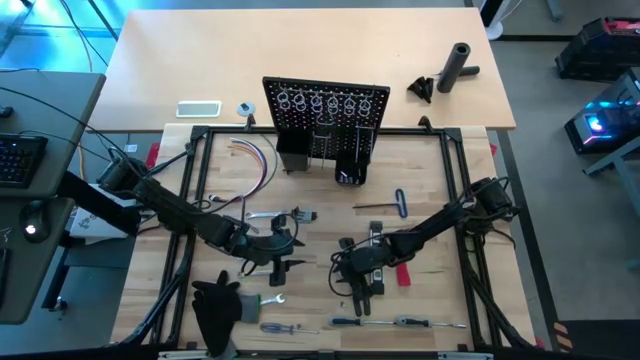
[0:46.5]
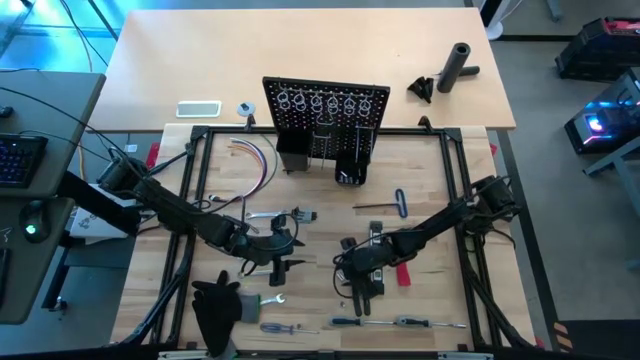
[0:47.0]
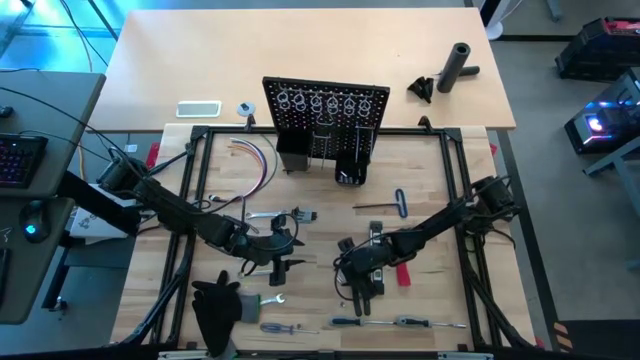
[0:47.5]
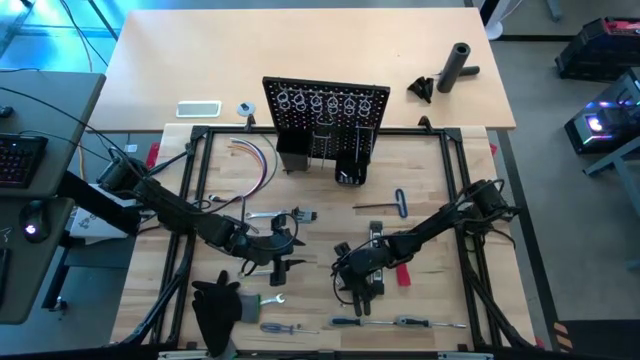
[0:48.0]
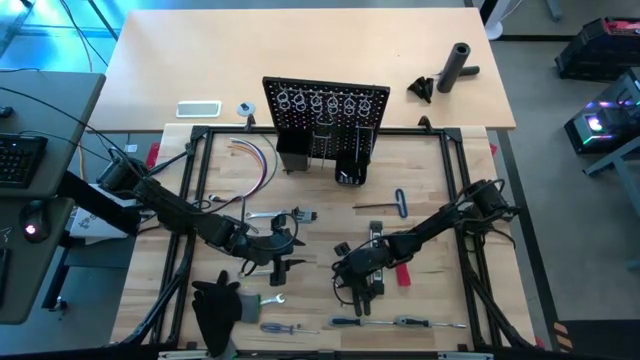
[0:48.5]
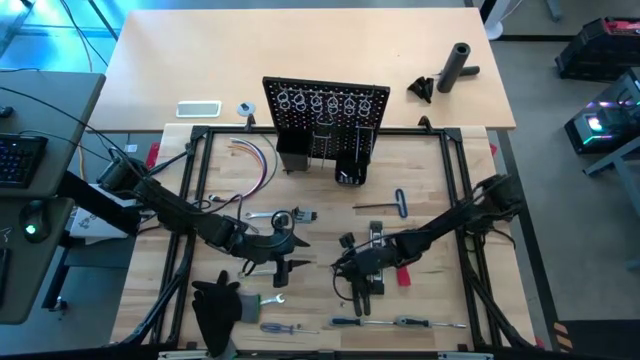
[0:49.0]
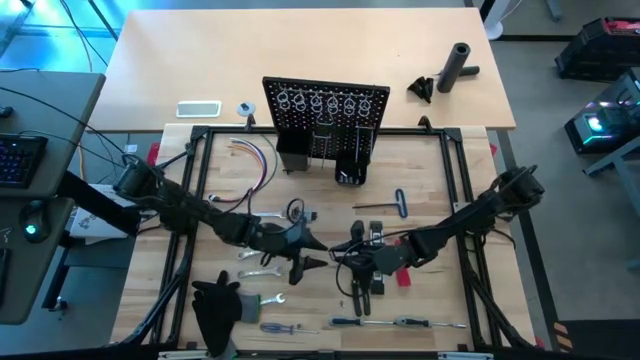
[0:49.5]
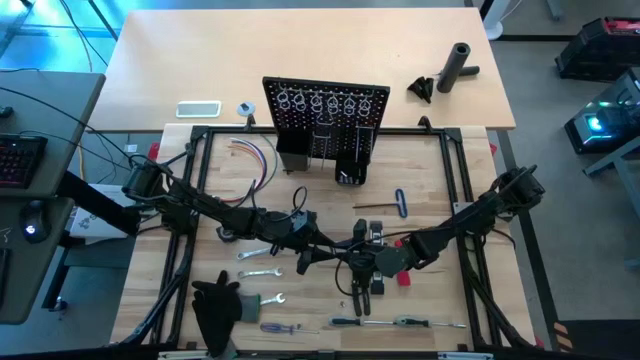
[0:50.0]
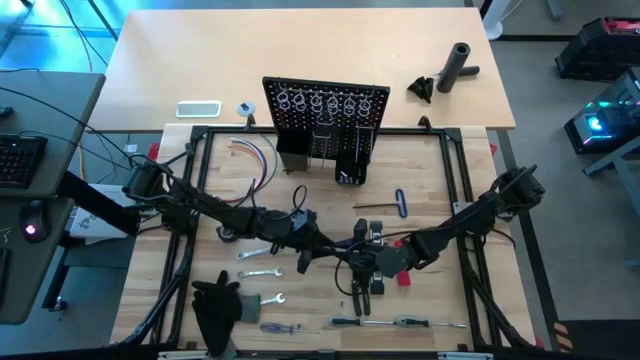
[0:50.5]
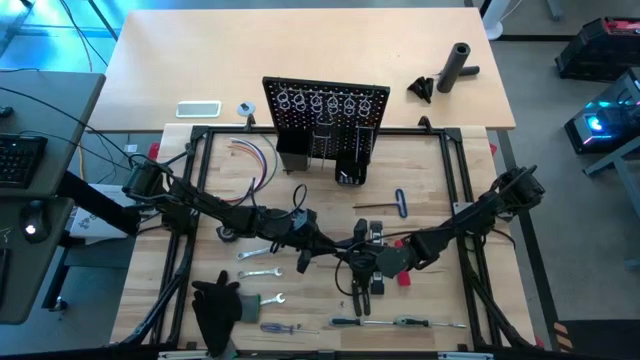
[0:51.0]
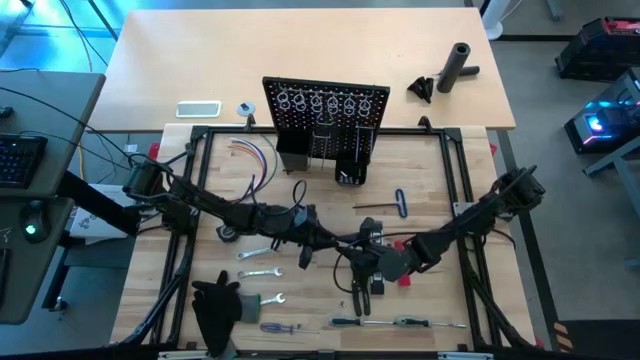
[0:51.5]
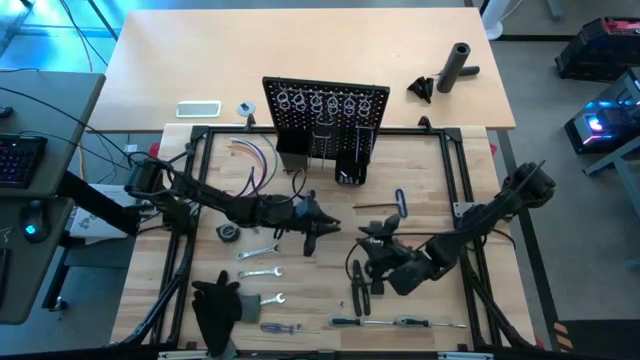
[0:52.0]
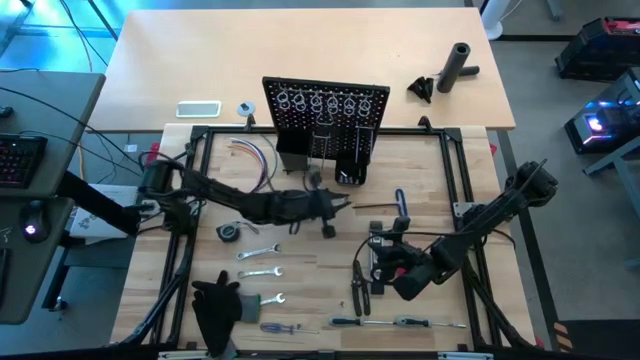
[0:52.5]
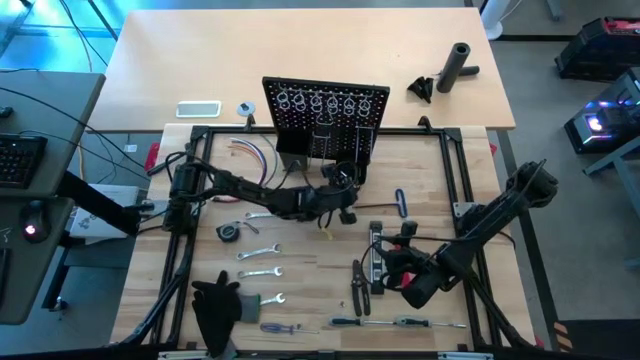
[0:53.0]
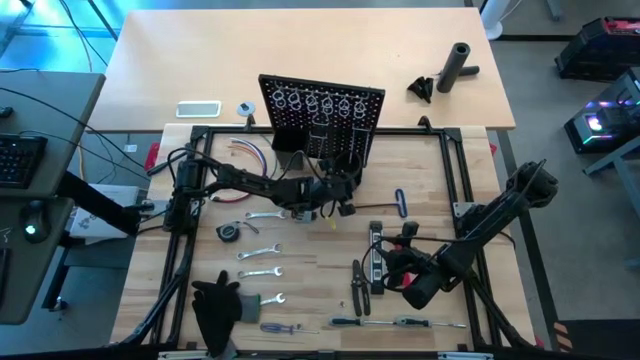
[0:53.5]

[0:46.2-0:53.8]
Task: Hang tools onto peg board
Put the socket into the small black bin on the black pegboard

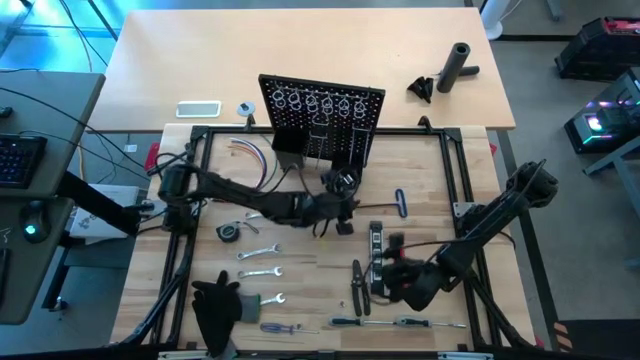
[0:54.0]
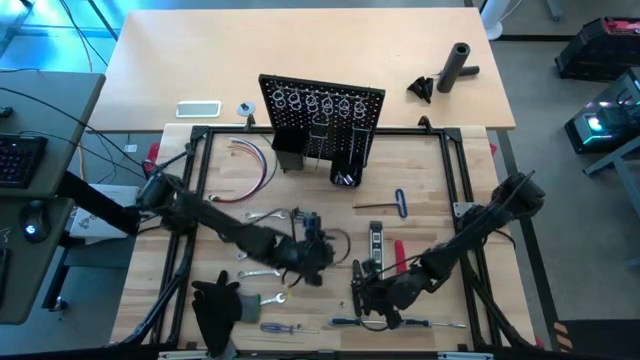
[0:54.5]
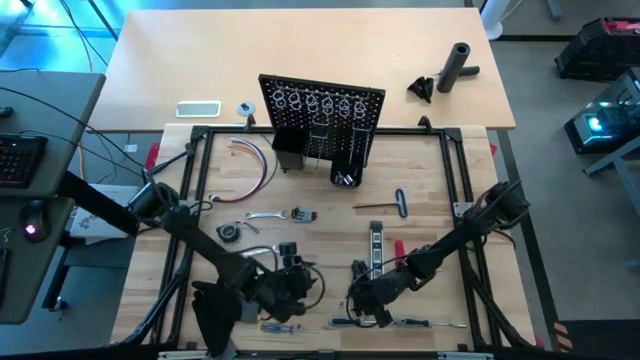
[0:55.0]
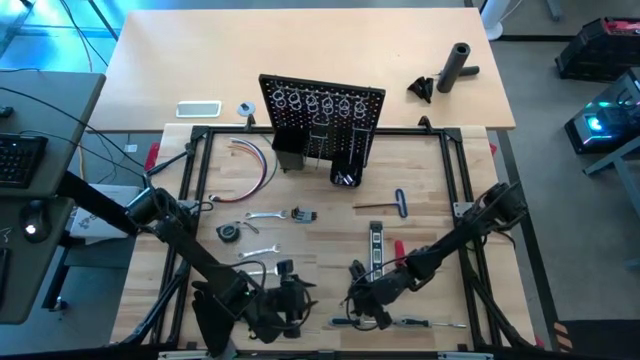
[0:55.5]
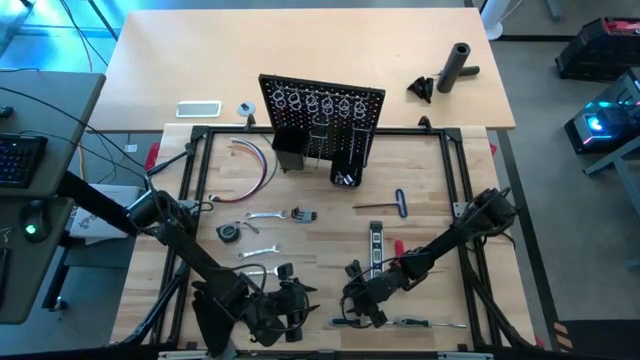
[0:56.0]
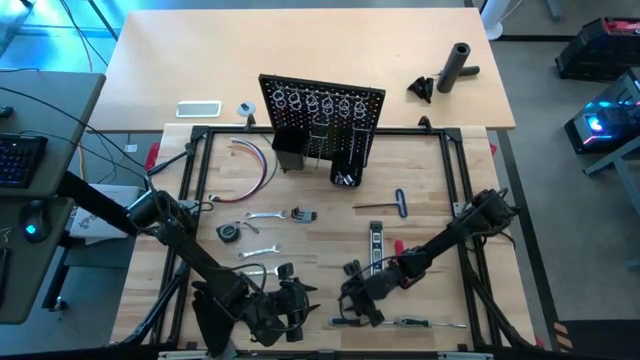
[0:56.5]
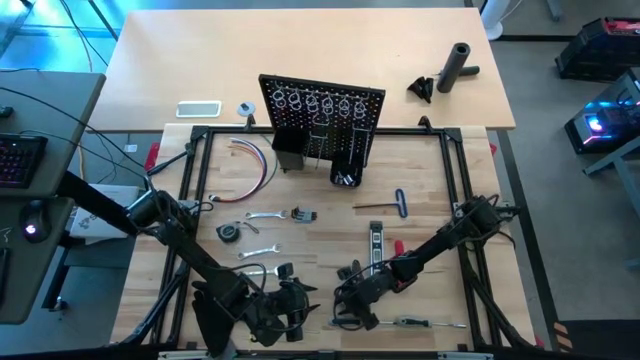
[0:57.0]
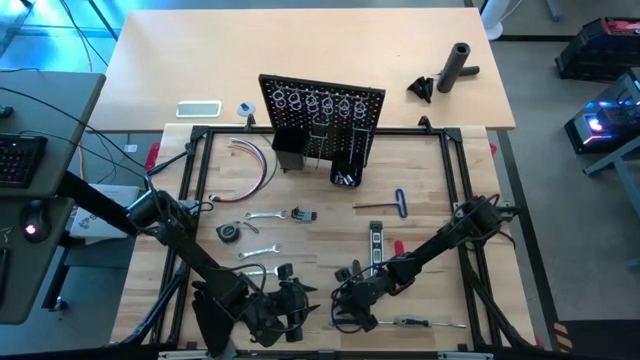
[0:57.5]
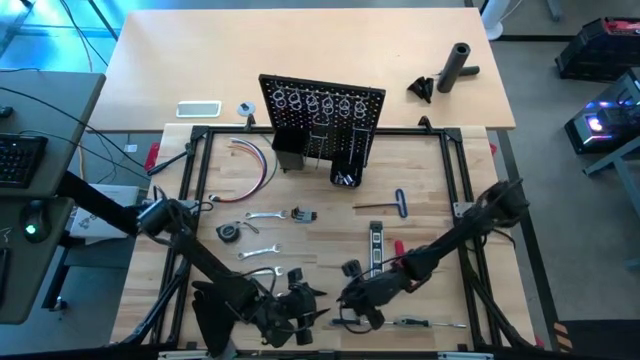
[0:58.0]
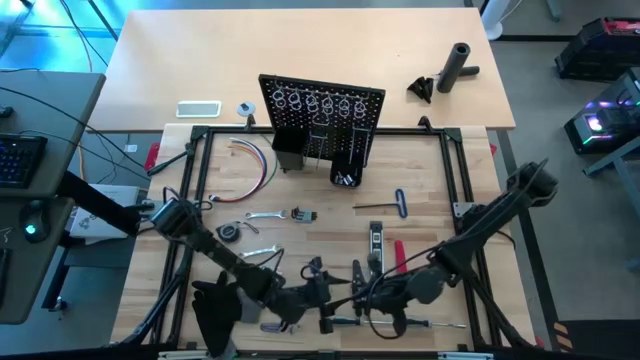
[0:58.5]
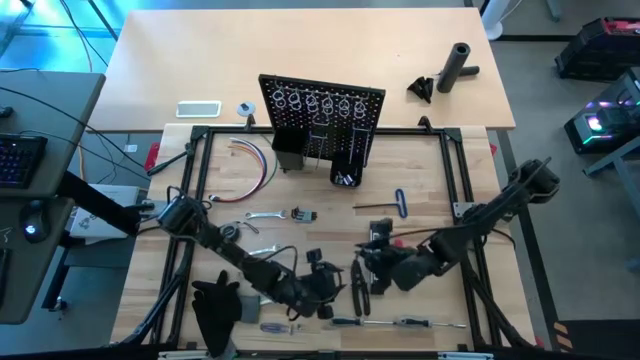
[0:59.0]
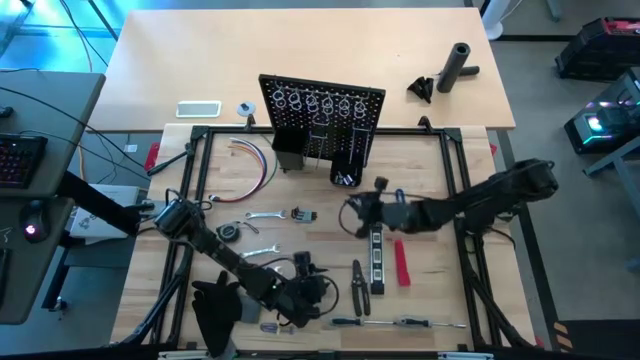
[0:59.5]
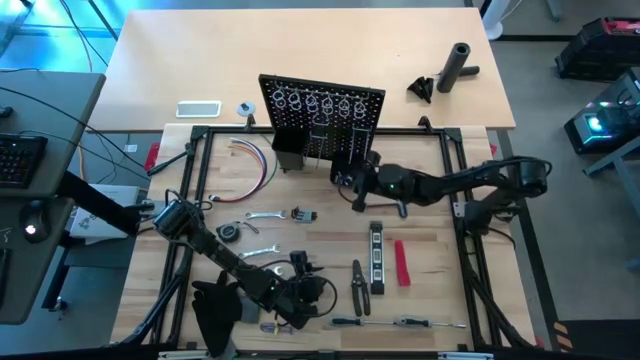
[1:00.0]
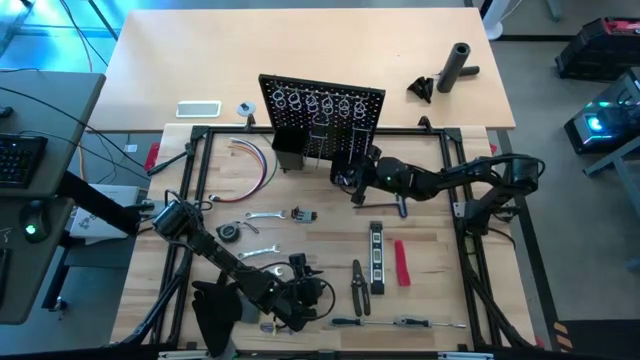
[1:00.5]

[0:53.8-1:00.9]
Put the socket into the small black bin on the black pegboard

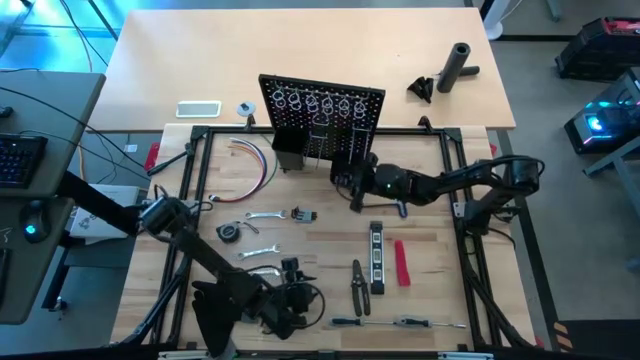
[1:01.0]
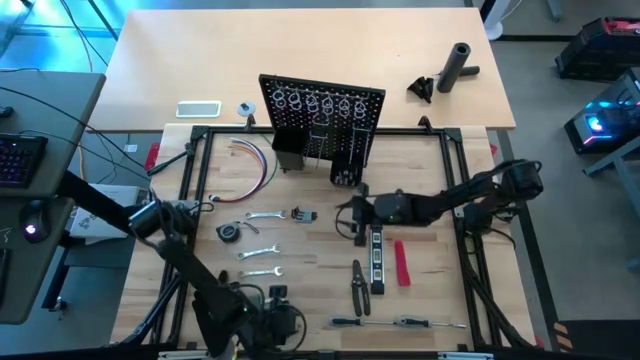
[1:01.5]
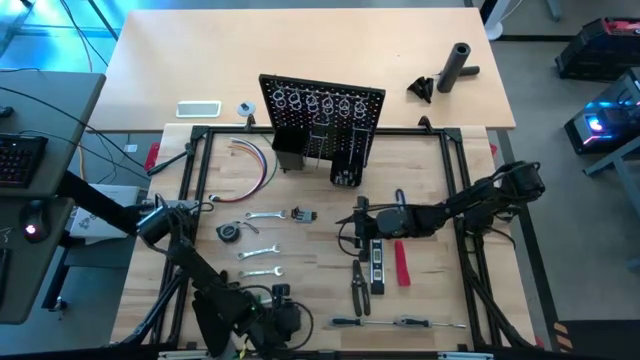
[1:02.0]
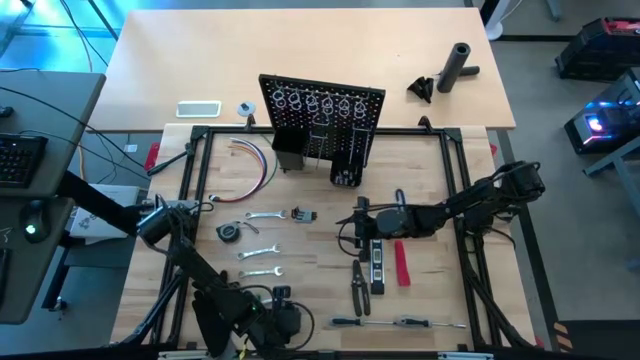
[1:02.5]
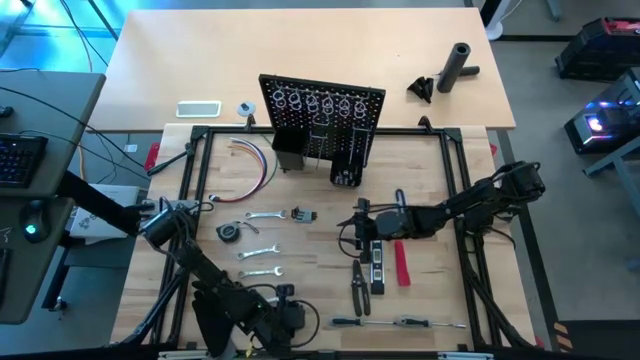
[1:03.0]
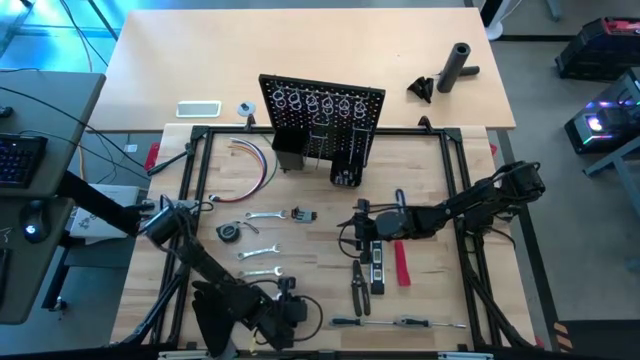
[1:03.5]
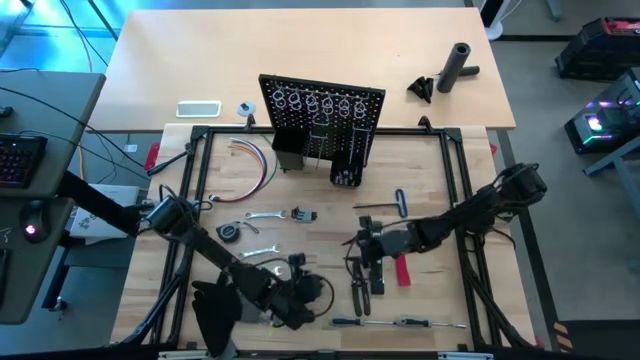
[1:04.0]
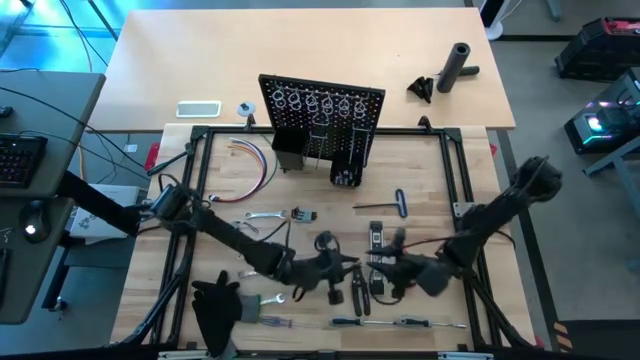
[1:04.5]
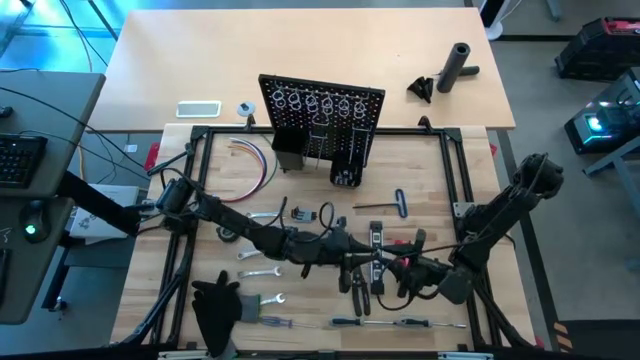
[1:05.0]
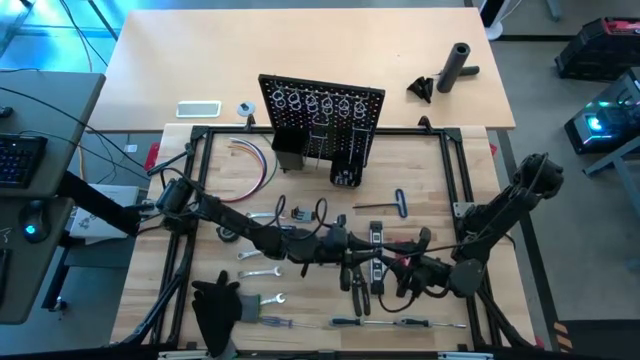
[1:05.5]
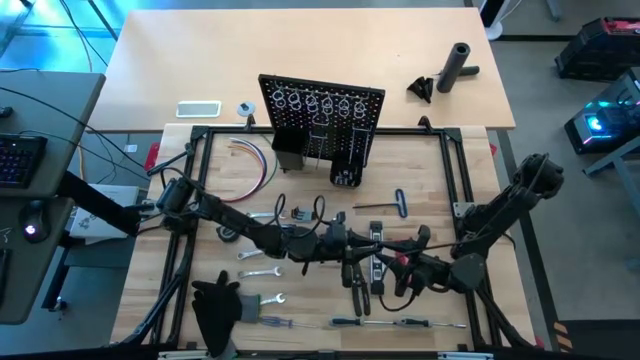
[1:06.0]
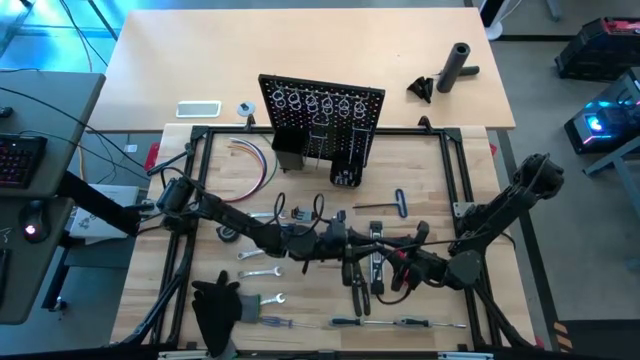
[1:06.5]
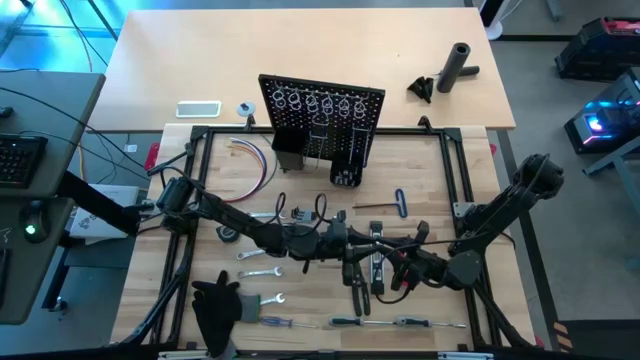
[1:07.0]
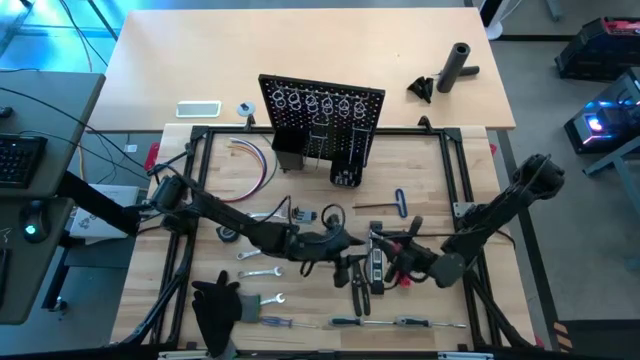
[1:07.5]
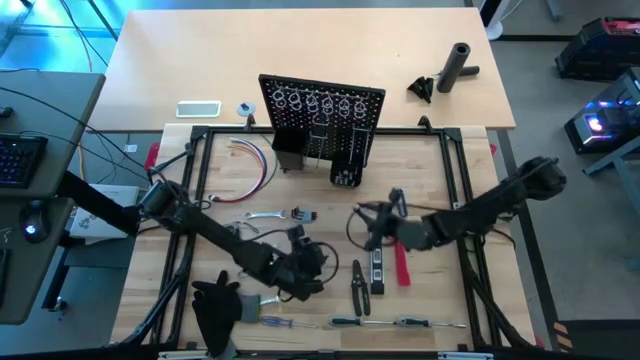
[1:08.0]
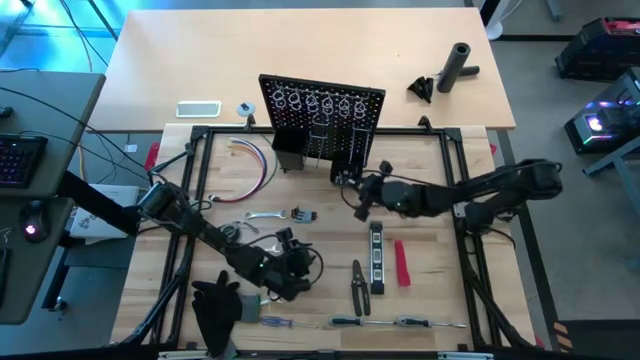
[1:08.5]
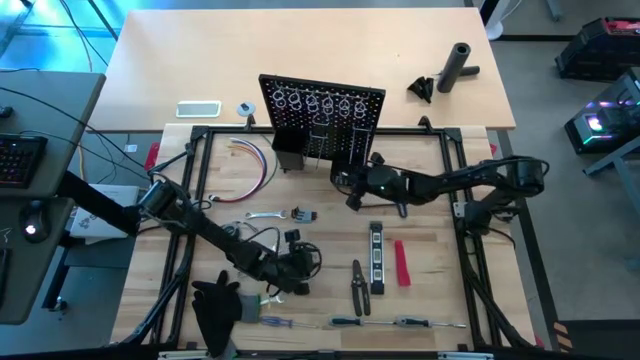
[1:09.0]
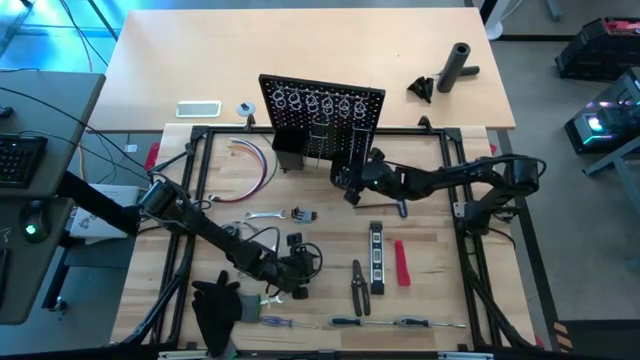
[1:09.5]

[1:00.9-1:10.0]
Put the socket into the small black bin on the black pegboard
